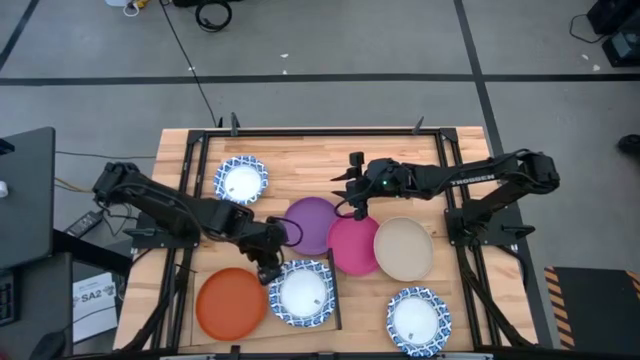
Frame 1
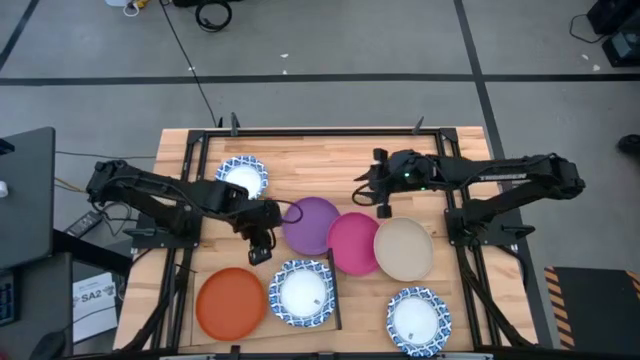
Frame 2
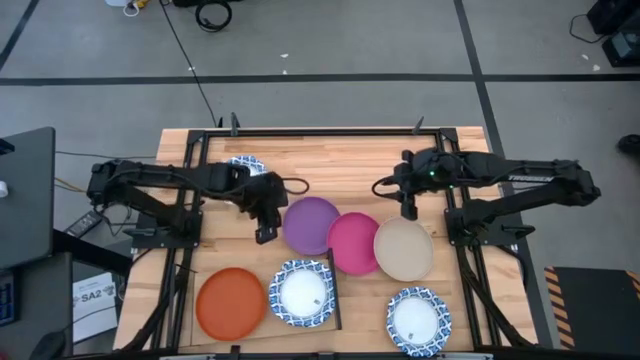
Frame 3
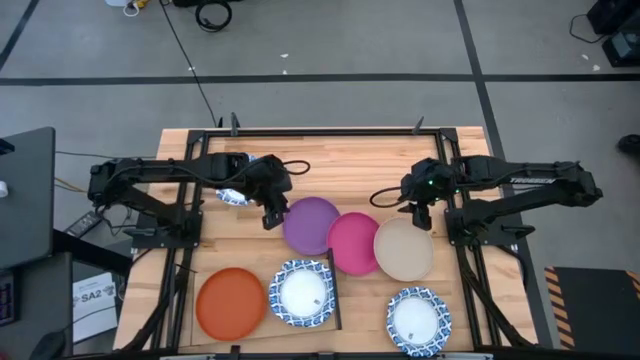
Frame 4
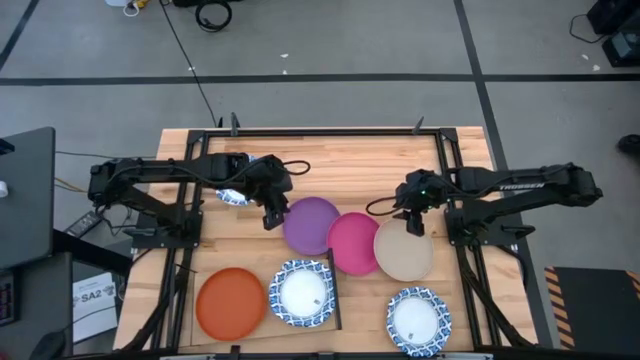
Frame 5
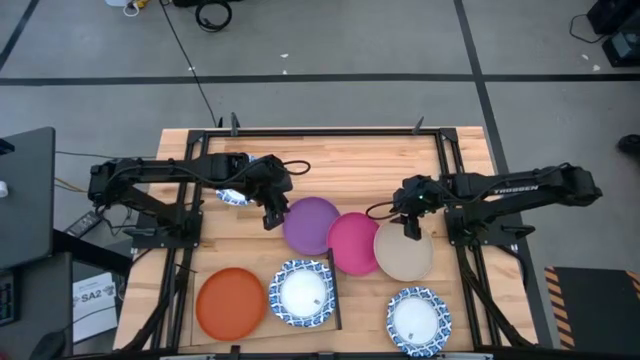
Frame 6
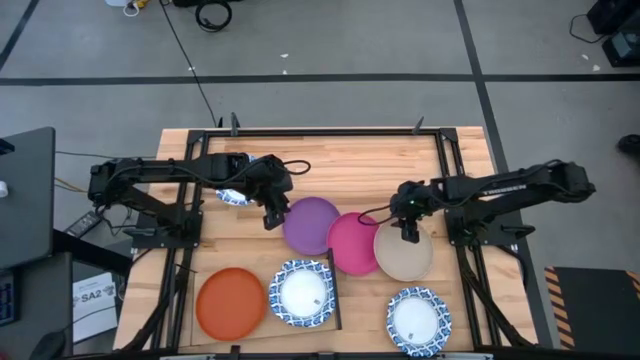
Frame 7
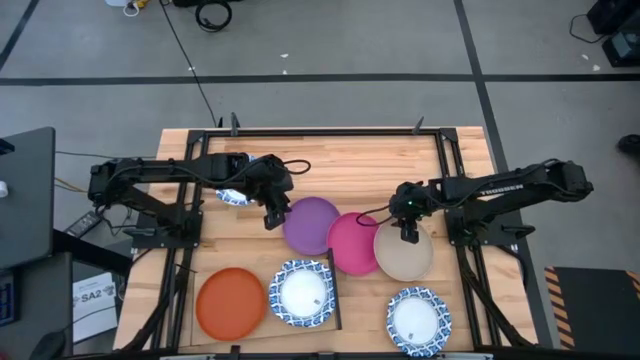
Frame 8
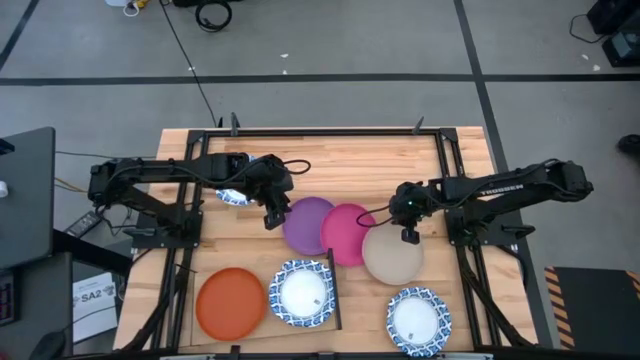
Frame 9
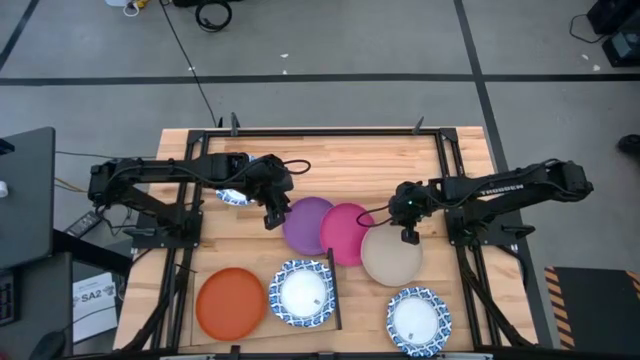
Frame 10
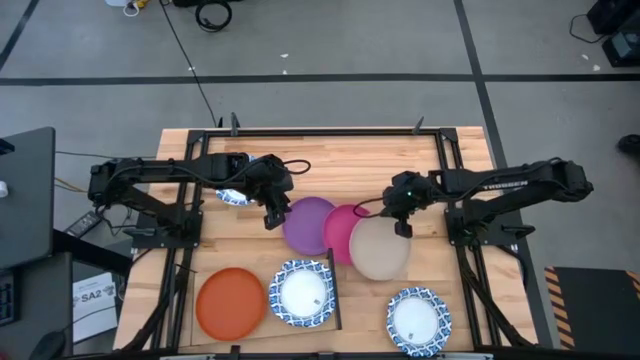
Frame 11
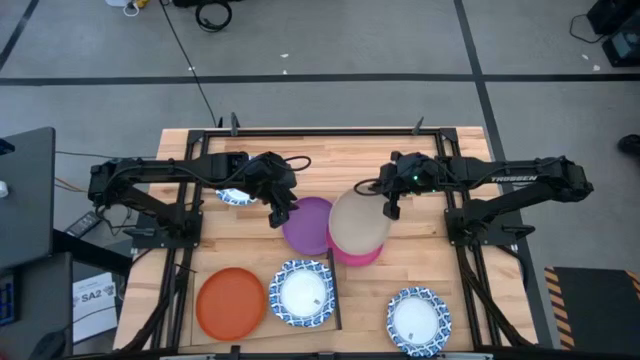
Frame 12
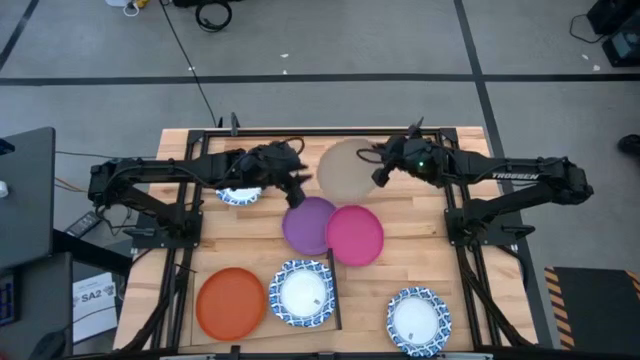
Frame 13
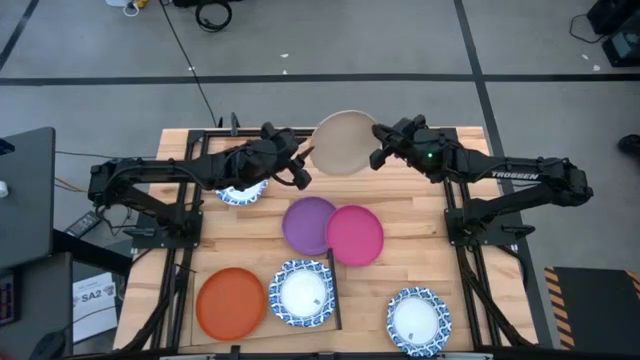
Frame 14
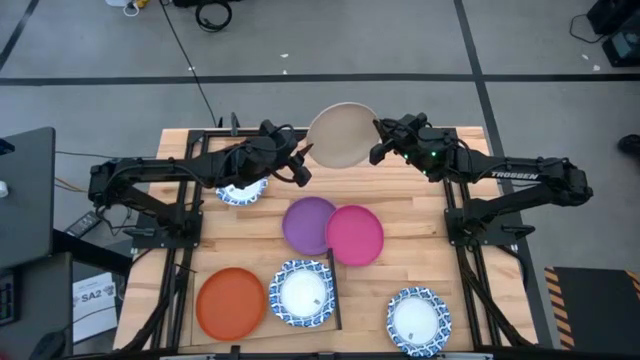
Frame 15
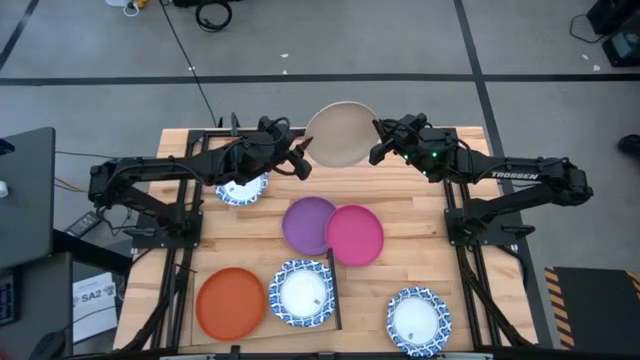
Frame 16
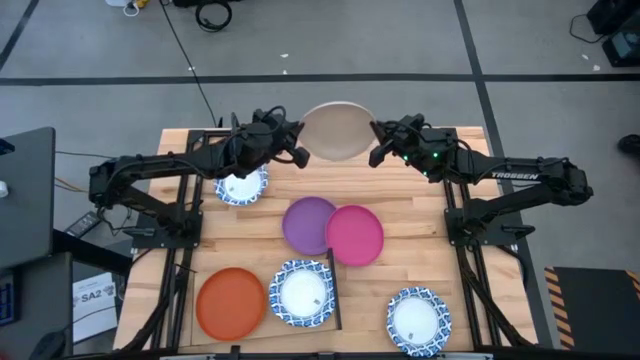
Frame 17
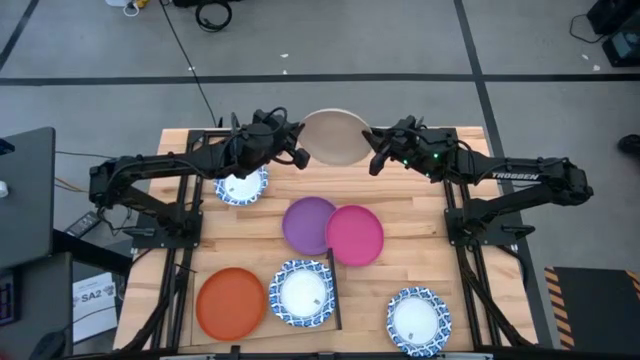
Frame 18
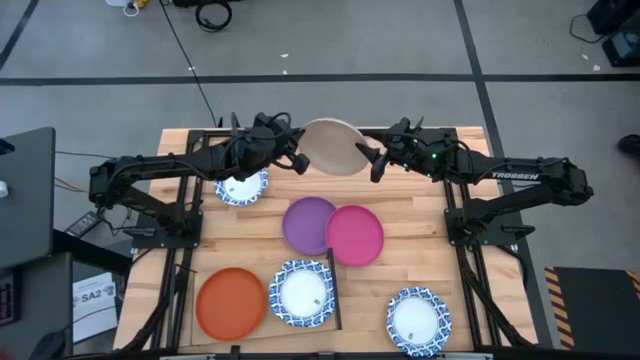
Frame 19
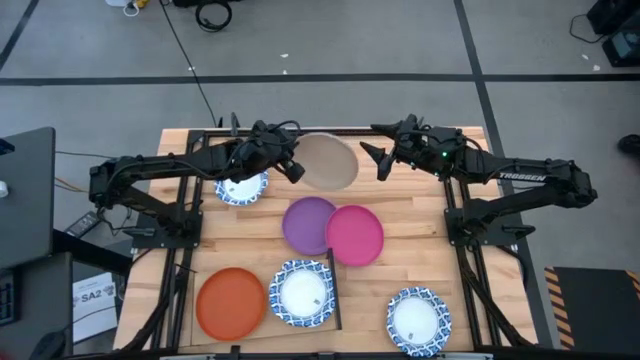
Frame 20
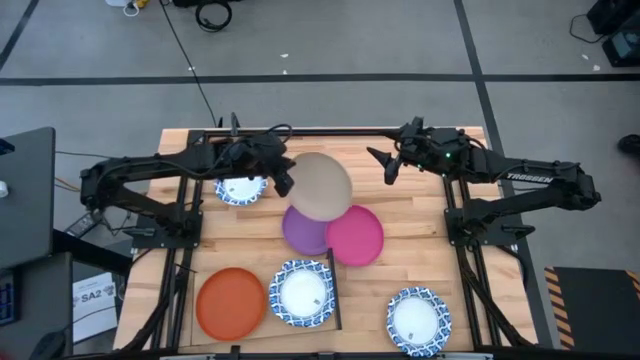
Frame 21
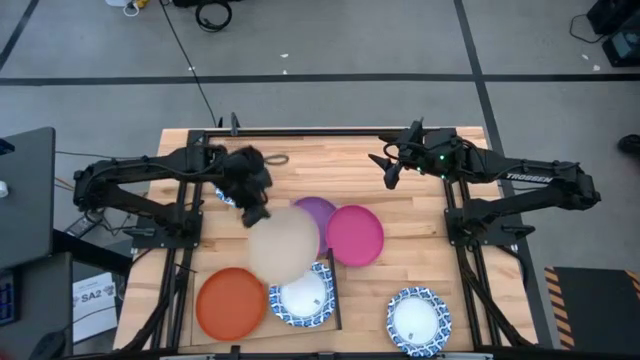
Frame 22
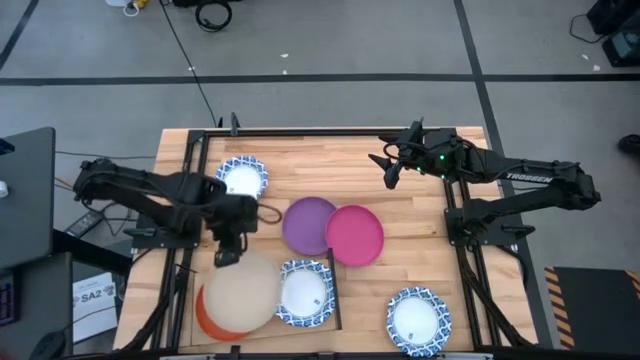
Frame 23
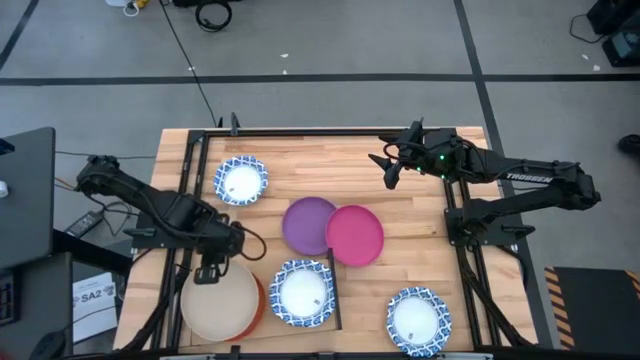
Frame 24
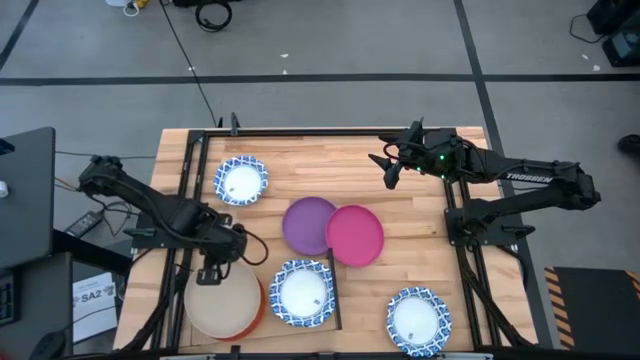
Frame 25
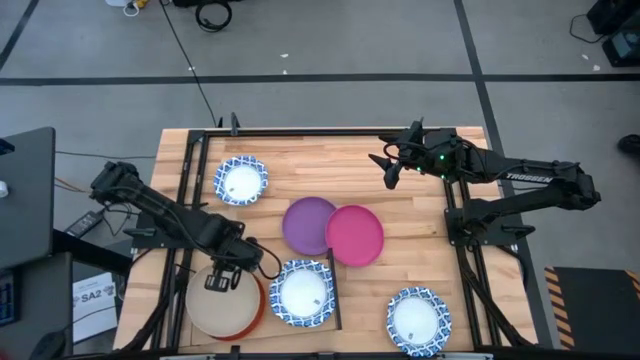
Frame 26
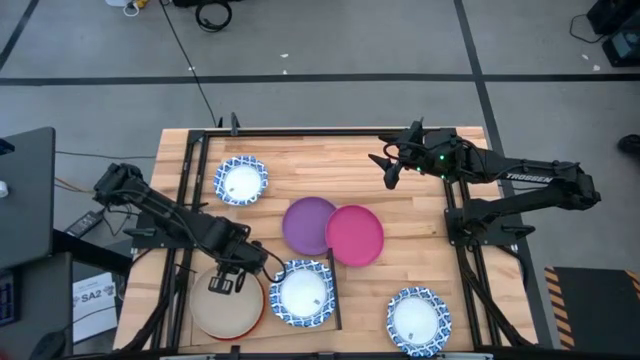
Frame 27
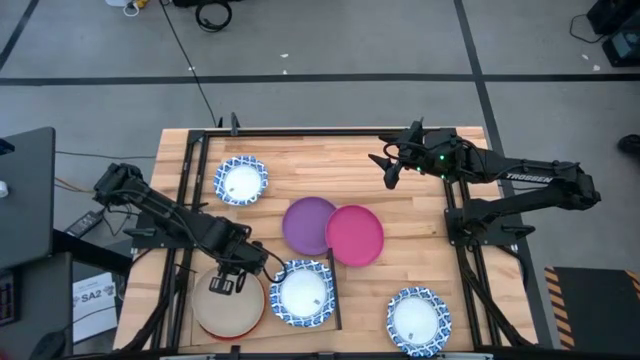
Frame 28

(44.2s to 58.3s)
Task: Place and stack plates onto a shelf
Stack the gray plate on top of the orange plate on the shelf

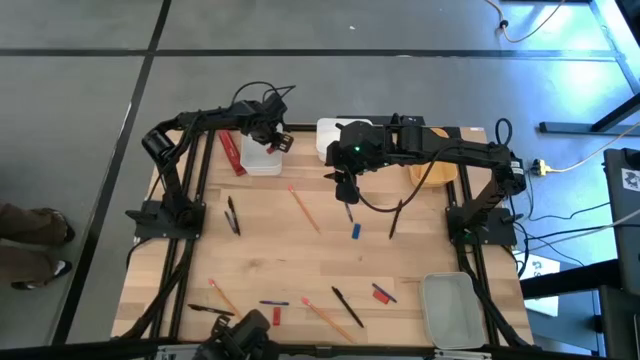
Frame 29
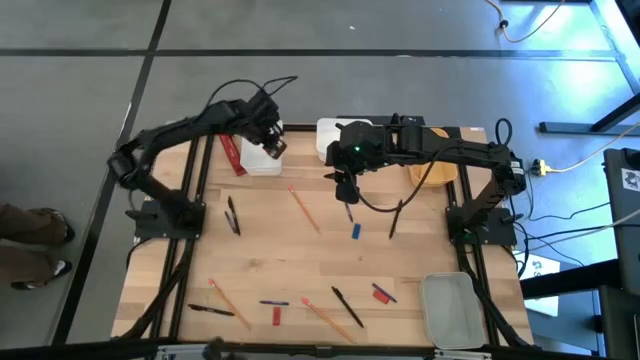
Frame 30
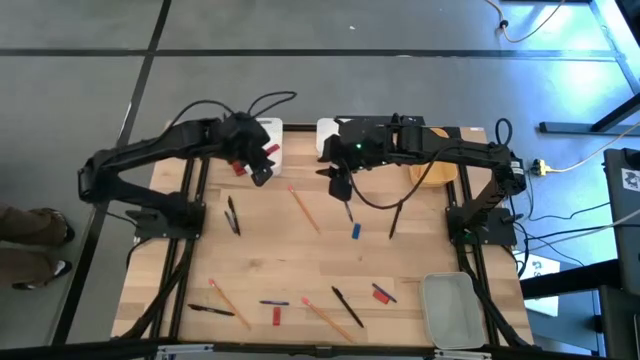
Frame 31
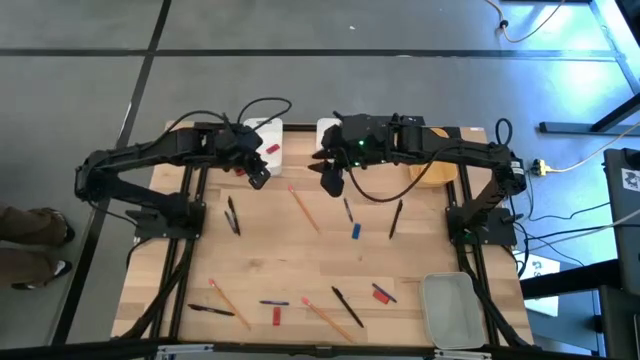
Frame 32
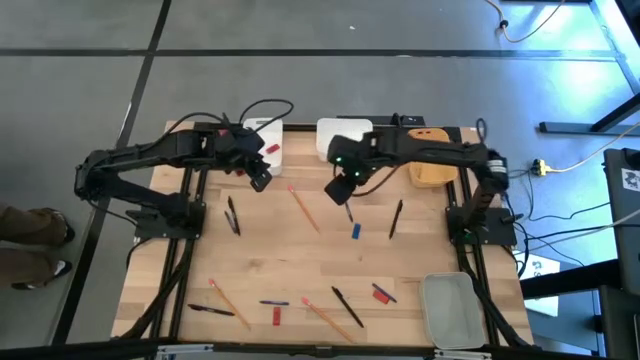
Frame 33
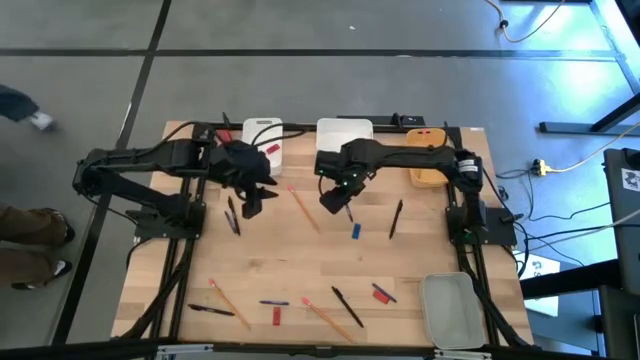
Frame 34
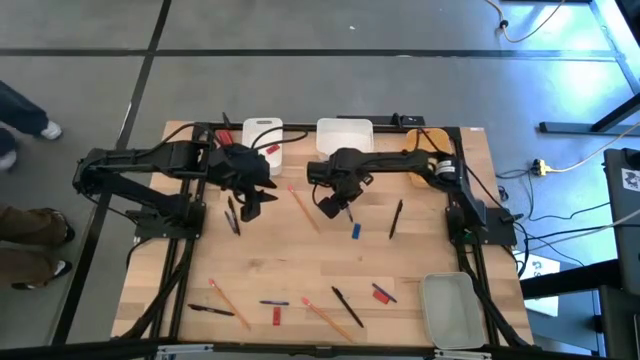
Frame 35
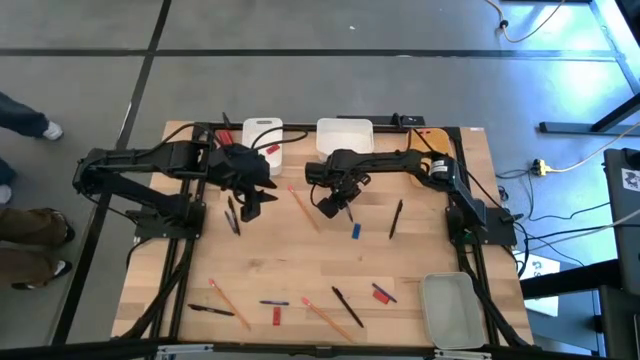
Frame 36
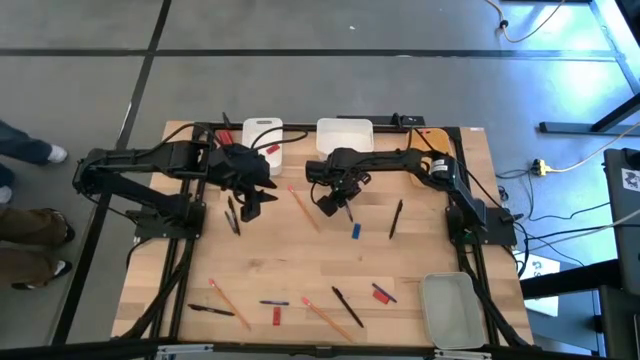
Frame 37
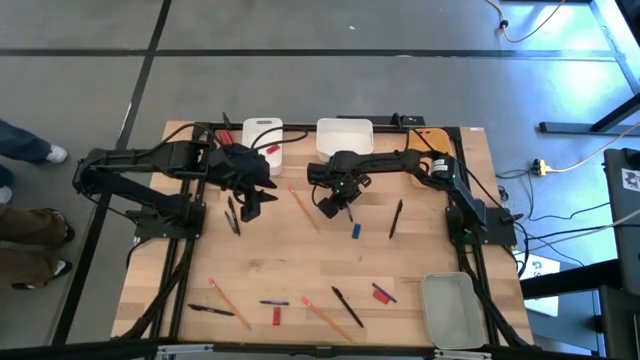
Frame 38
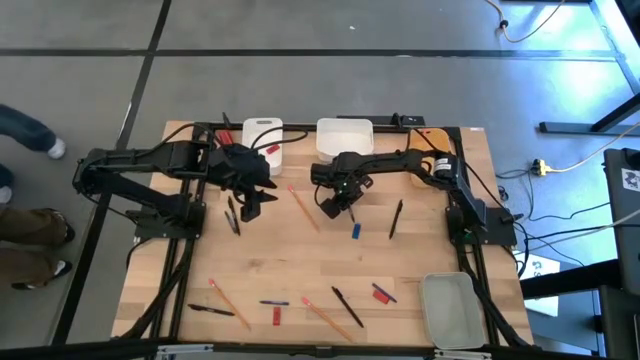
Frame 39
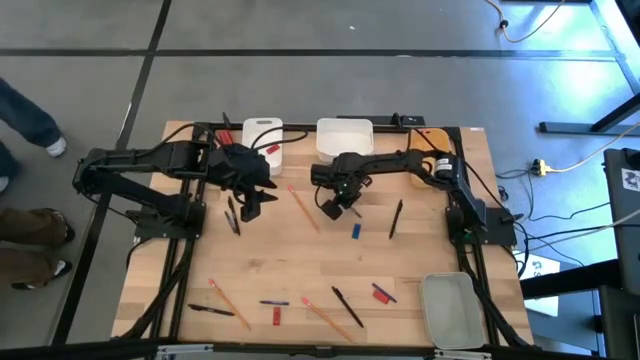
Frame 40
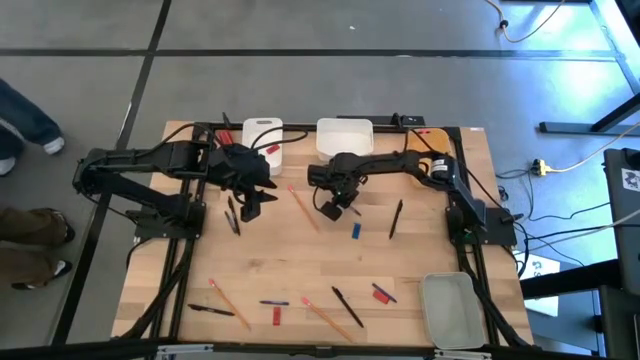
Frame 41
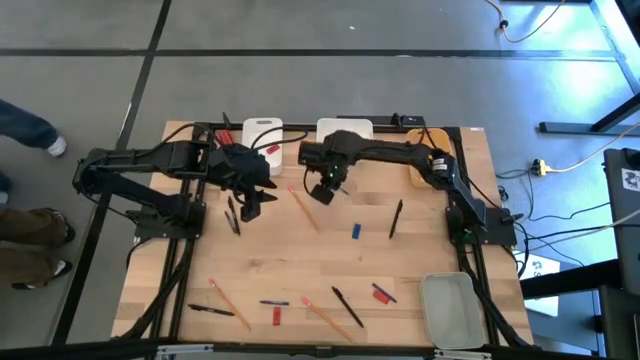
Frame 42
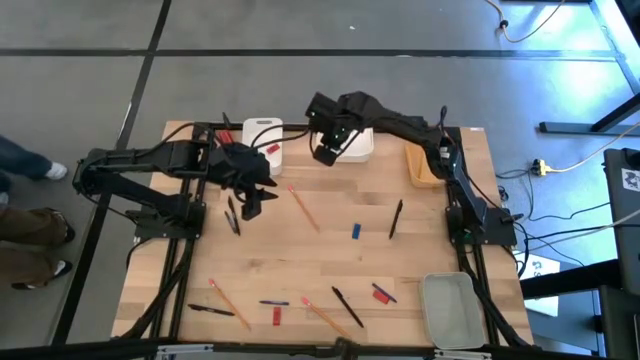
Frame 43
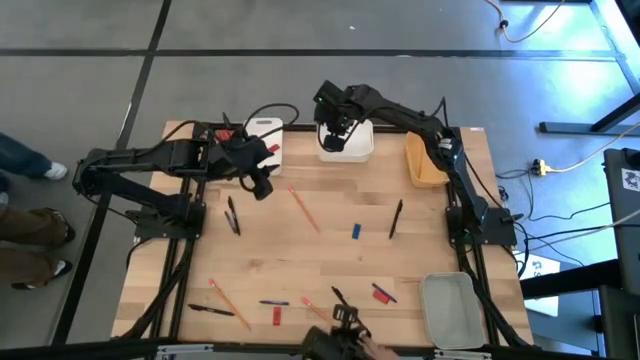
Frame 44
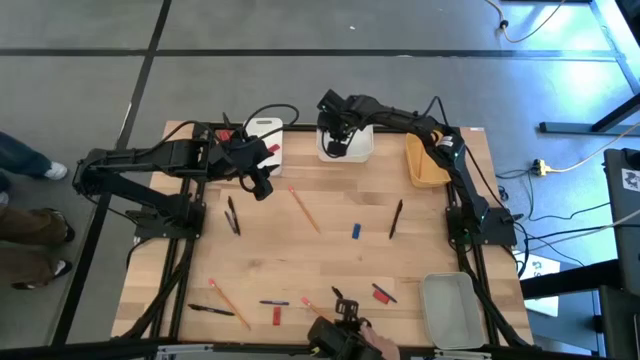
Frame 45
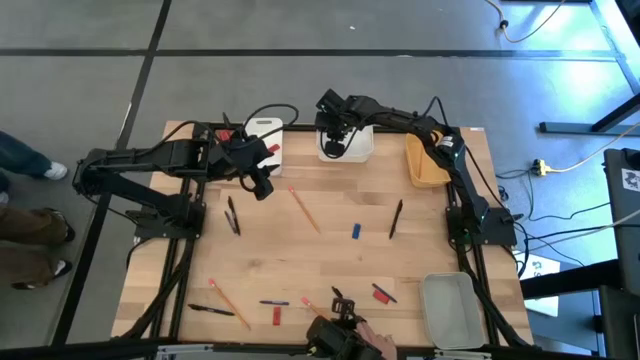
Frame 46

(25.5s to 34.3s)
Task: Sort crayons/erasers/pens/pencils in bins
Put the blue crayon into the right white bin
